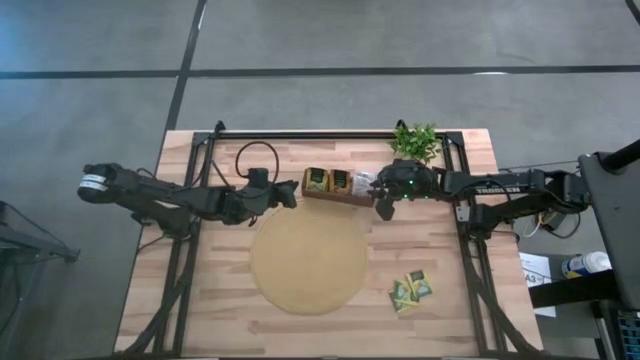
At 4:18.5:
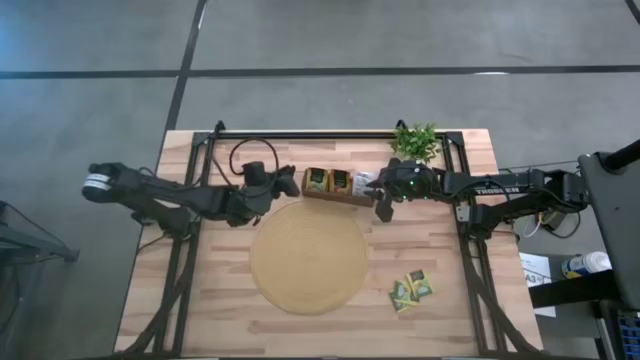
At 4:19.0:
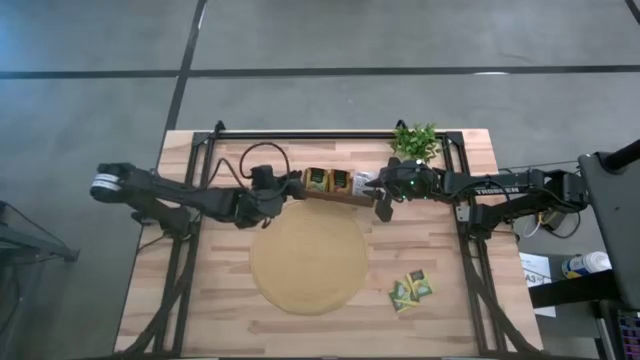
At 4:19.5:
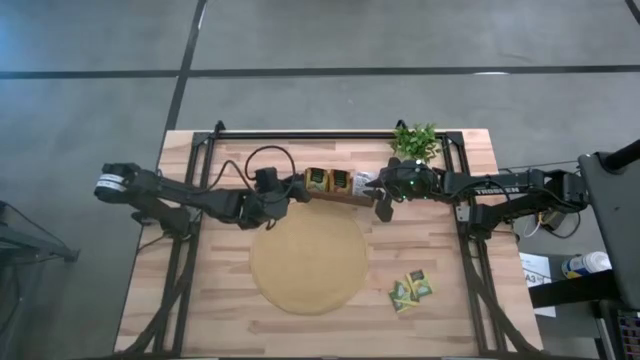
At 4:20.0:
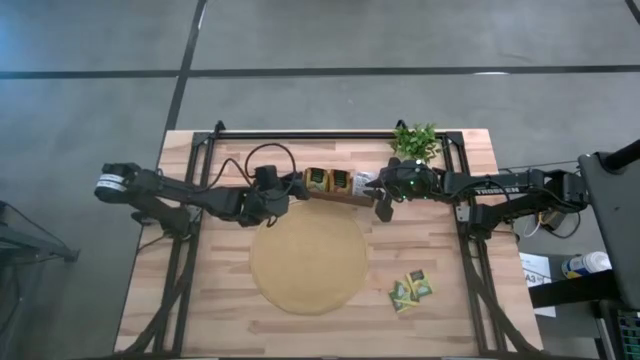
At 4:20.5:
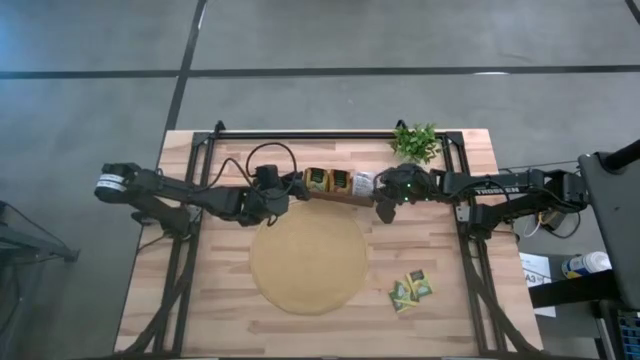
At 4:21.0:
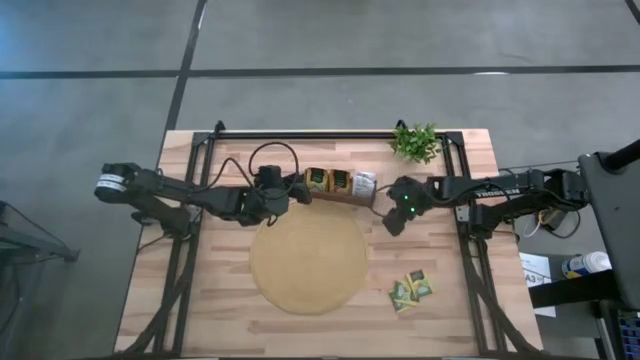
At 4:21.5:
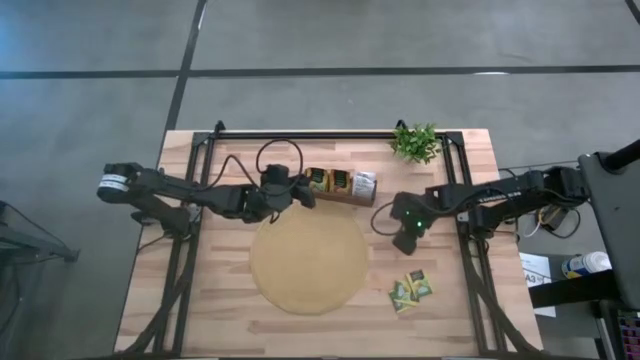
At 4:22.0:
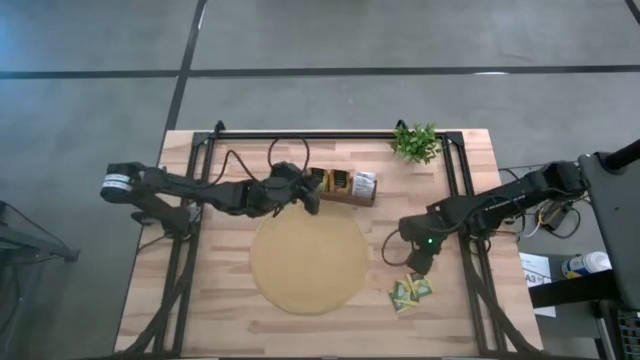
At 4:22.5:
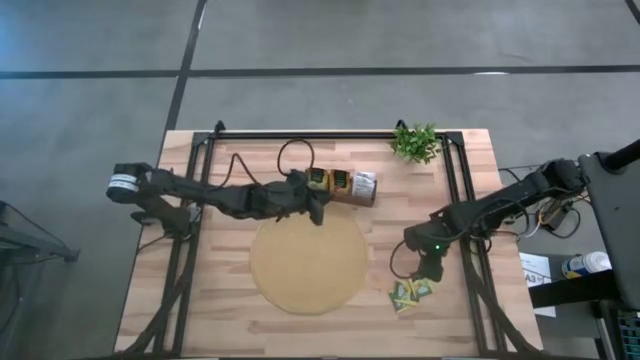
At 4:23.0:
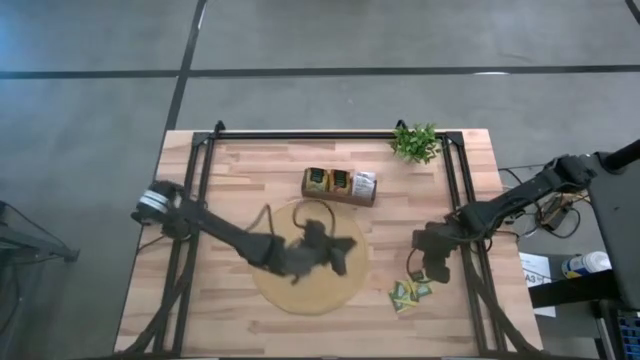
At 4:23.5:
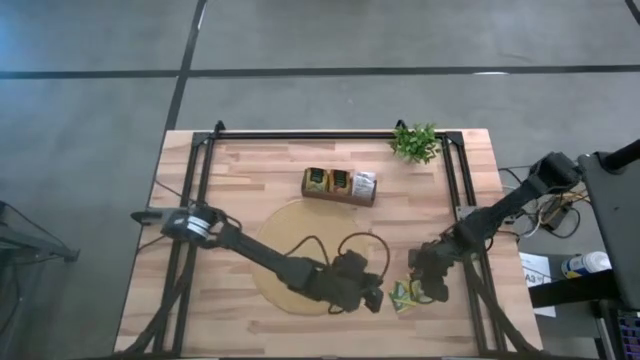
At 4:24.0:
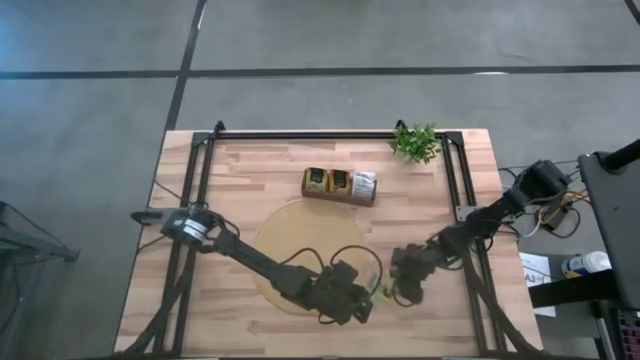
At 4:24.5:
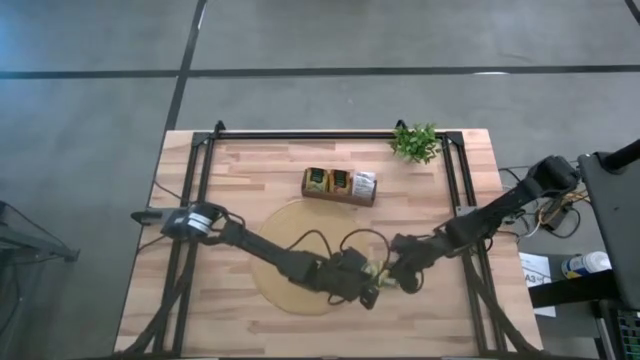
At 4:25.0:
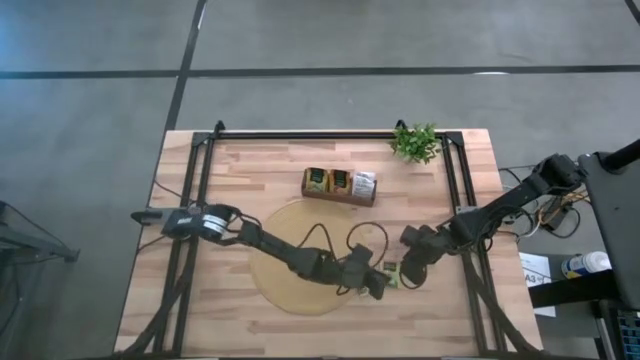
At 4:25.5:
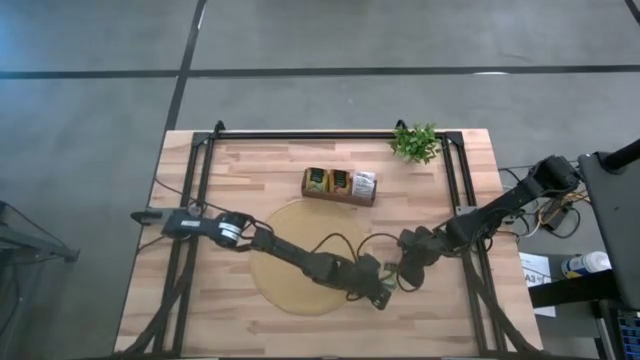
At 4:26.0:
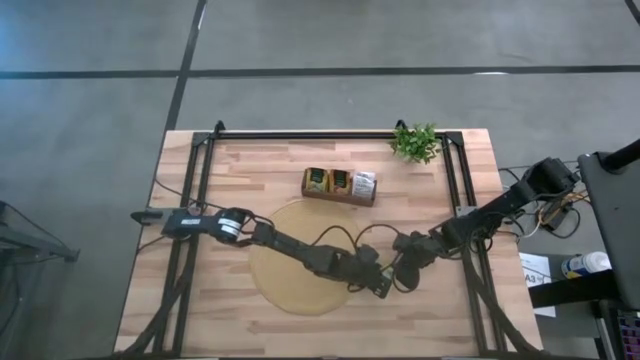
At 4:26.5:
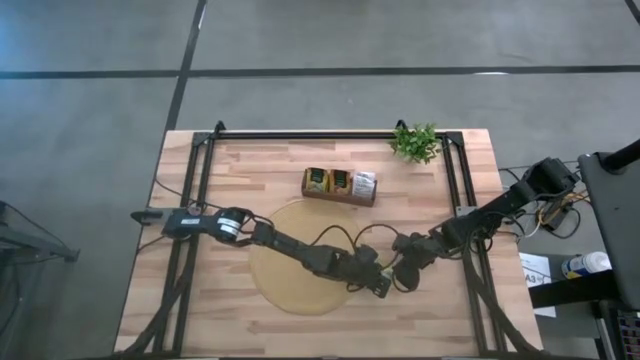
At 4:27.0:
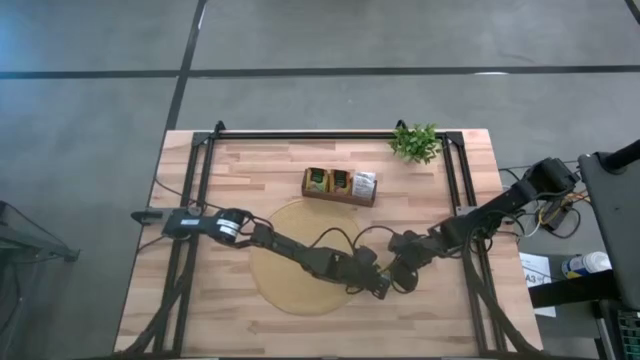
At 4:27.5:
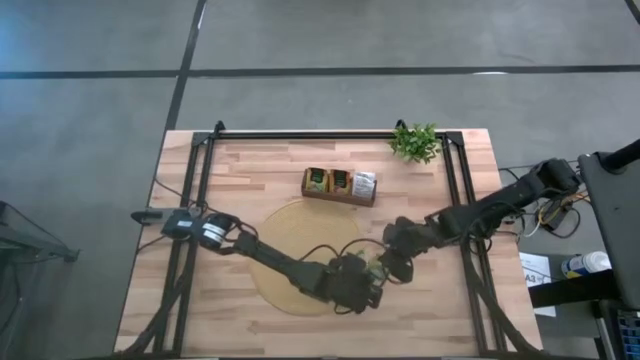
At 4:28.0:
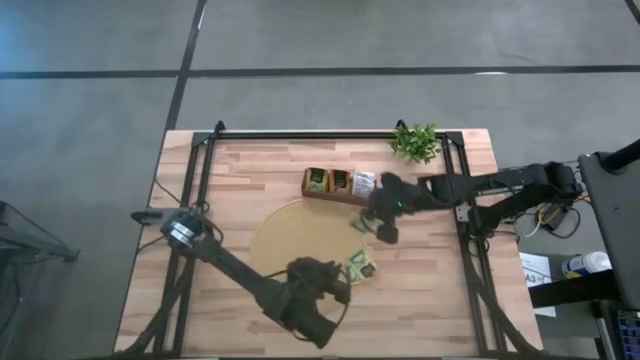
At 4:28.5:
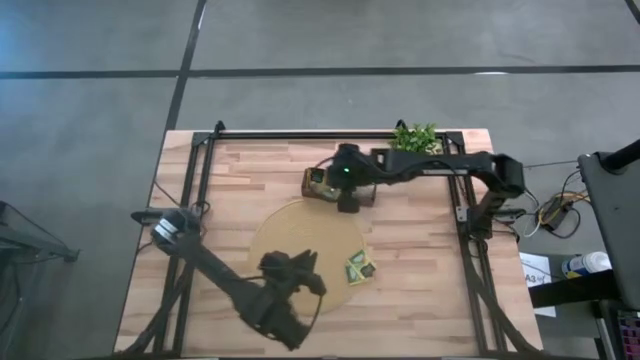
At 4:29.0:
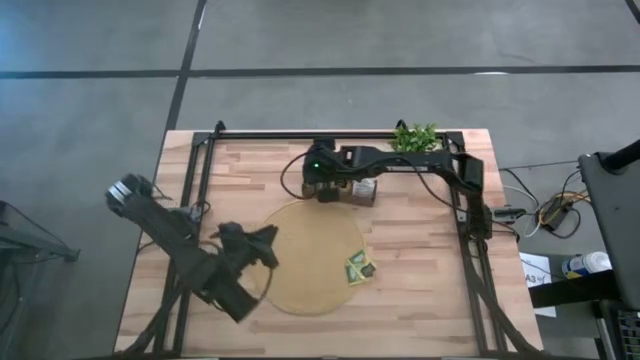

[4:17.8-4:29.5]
Task: Pick & Place Tea
Put the green tea bag into the left section of the wooden organizer

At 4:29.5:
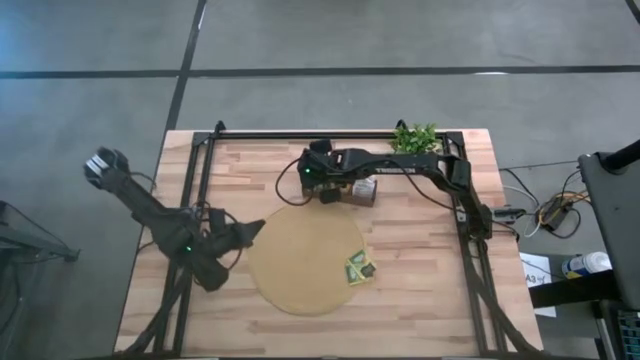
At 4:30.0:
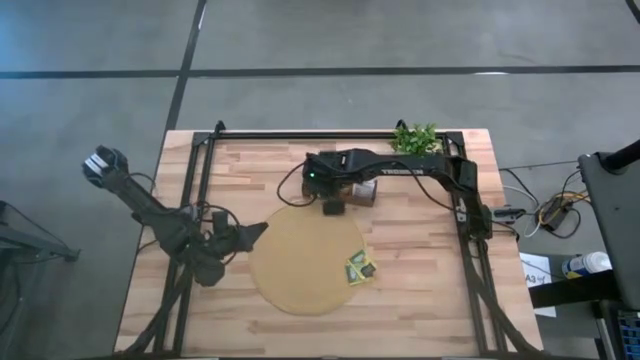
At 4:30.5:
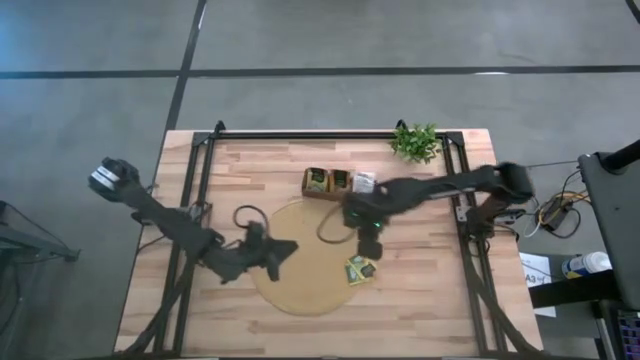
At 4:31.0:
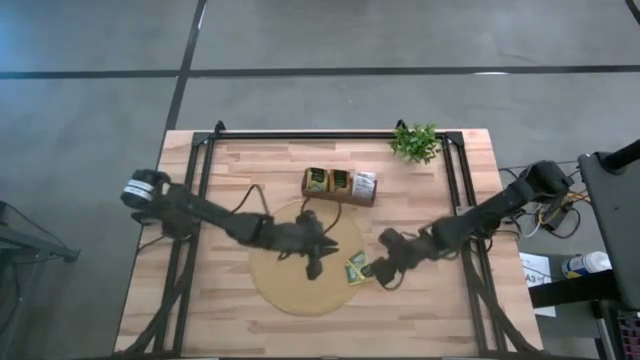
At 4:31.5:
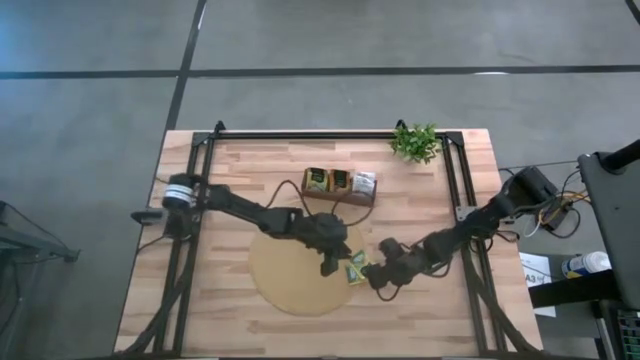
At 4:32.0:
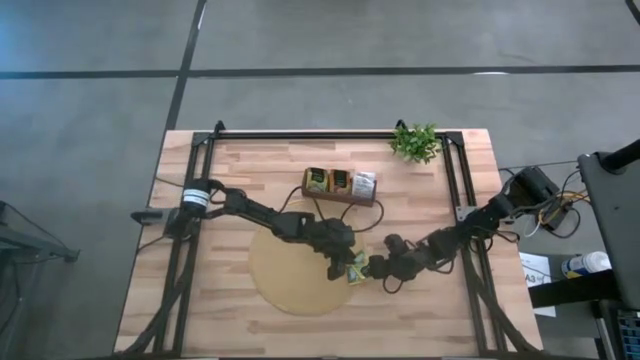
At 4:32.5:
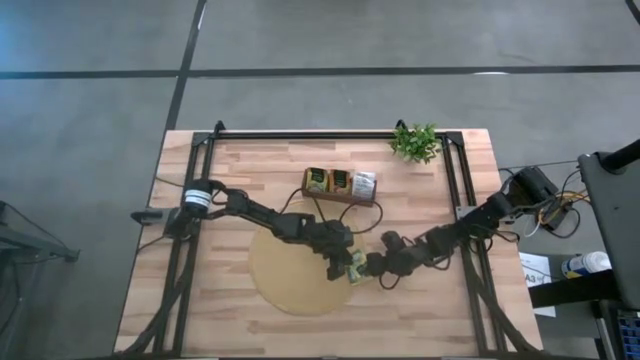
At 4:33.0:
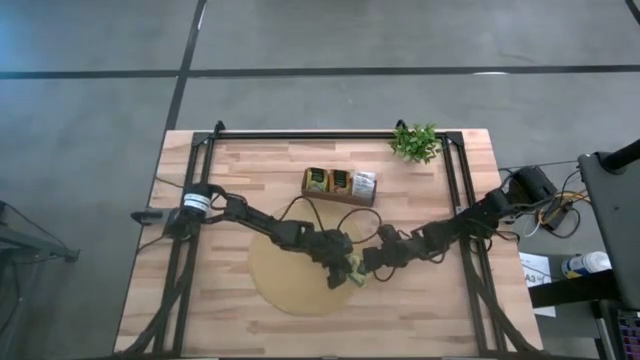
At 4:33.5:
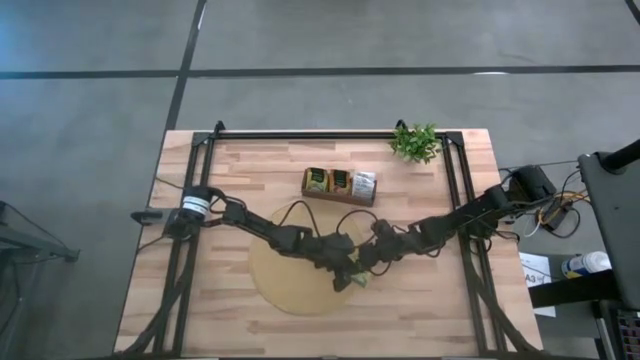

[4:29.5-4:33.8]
Put the green tea bag into the left section of the wooden organizer

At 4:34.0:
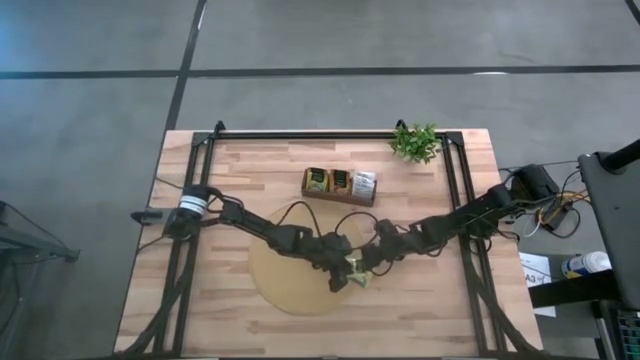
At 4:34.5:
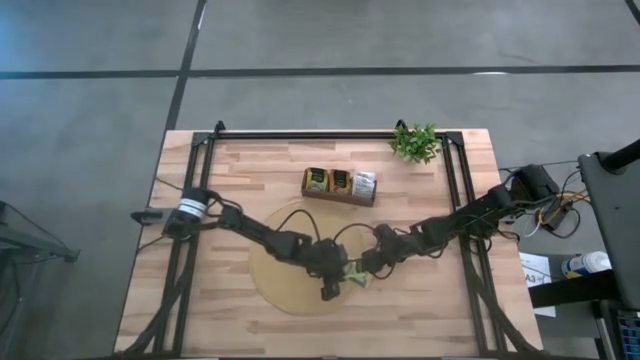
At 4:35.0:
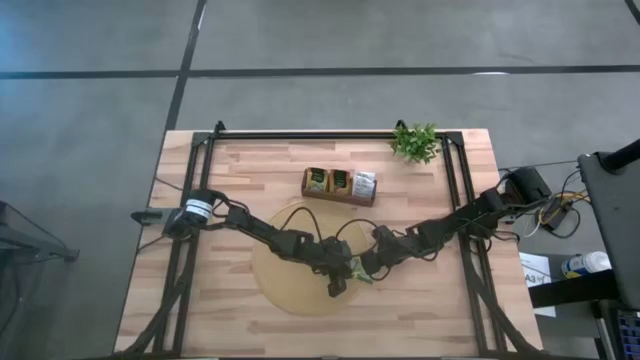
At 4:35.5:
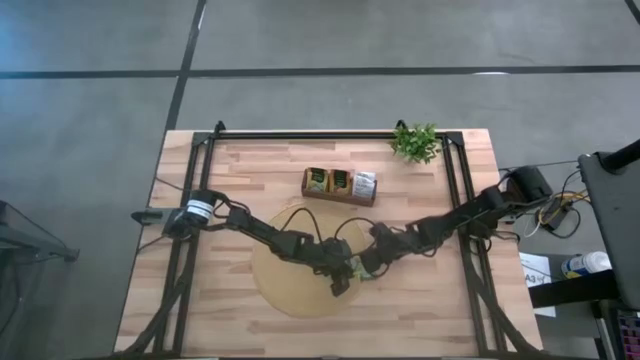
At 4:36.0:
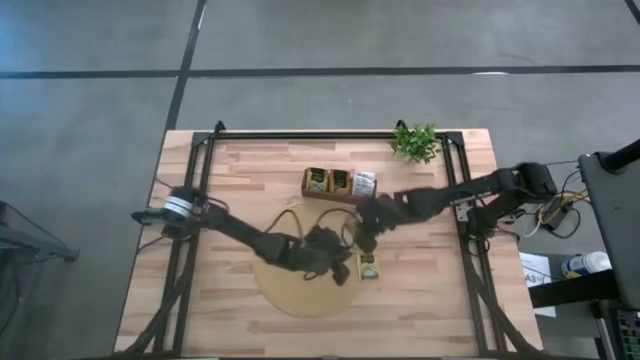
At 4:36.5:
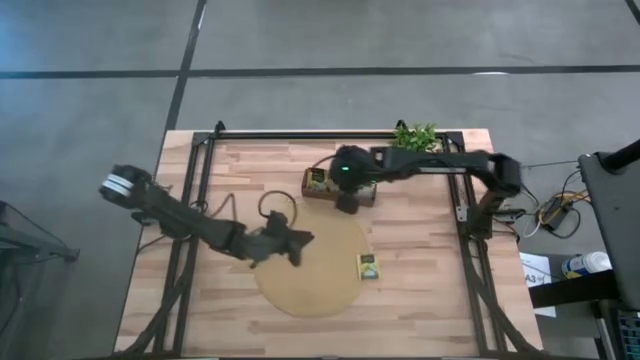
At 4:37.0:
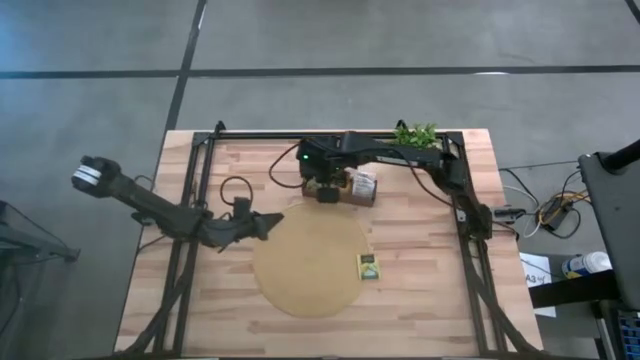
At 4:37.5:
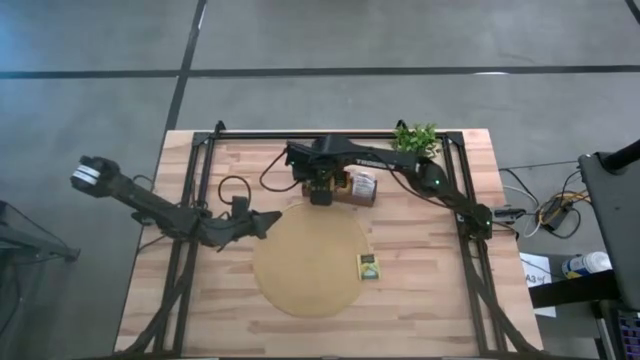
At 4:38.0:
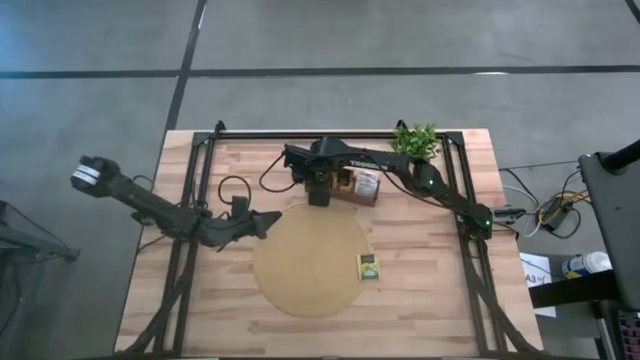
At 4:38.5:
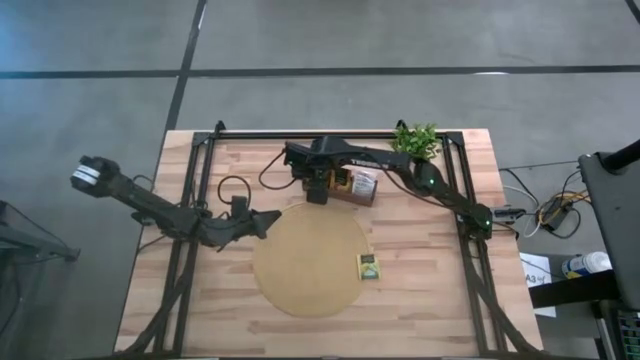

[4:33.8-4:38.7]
Put the green tea bag into the left section of the wooden organizer

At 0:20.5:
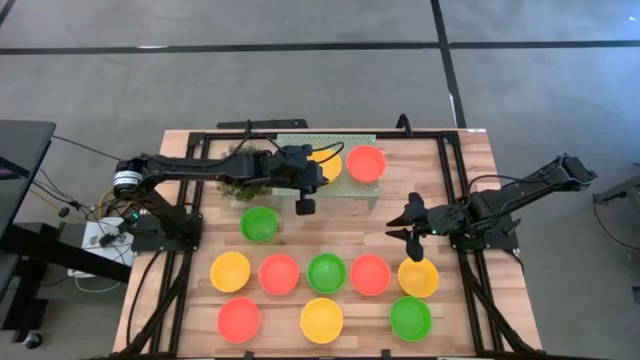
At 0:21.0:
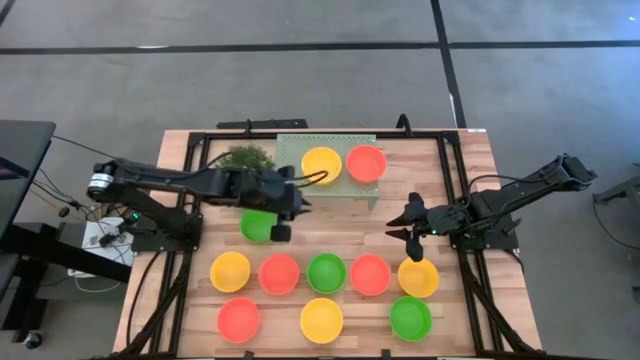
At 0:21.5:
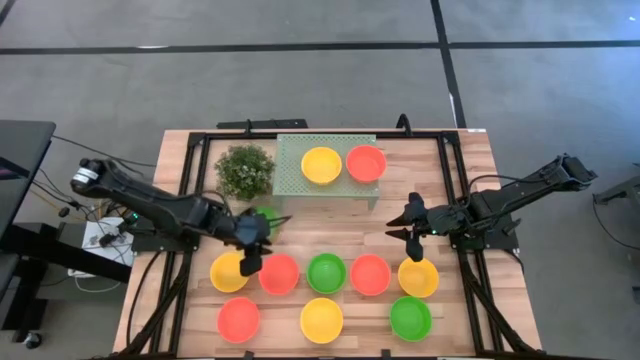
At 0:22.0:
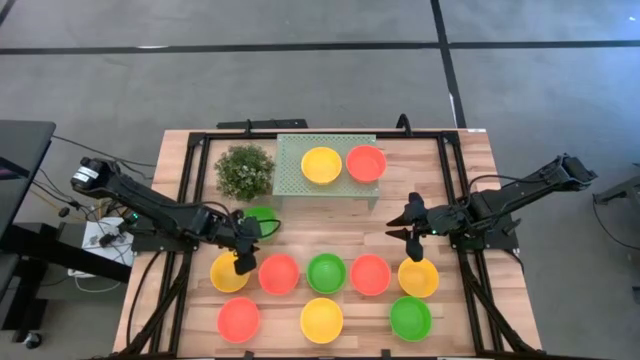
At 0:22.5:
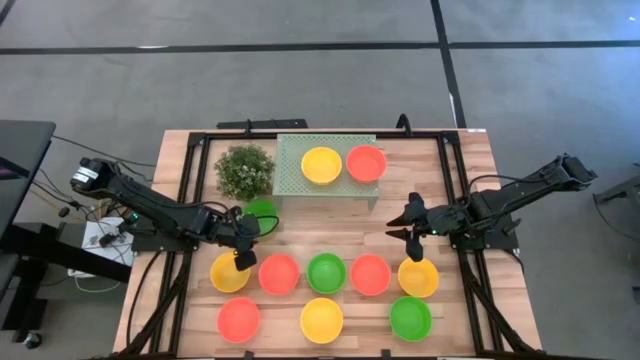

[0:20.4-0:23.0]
Task: Pick & Place Mini bowls
Put the green bowl on the shelf
